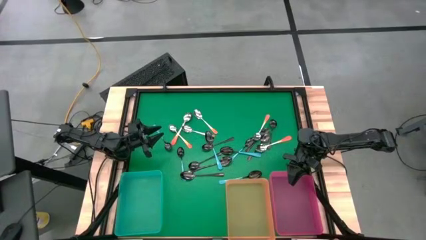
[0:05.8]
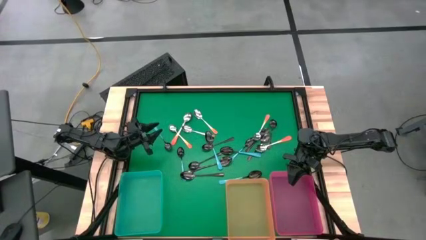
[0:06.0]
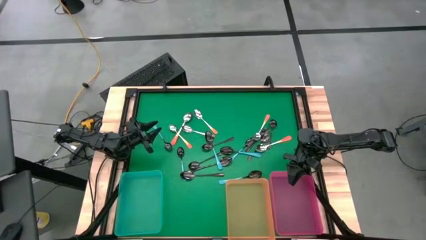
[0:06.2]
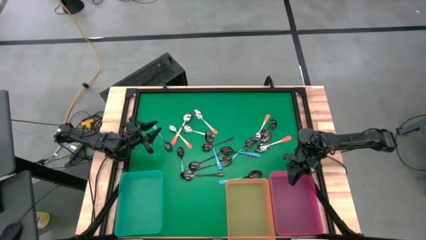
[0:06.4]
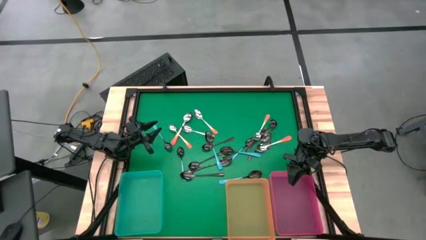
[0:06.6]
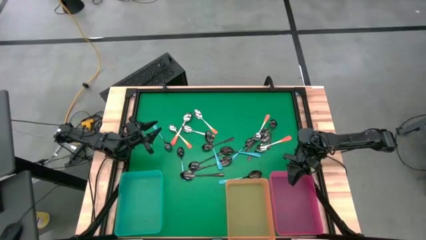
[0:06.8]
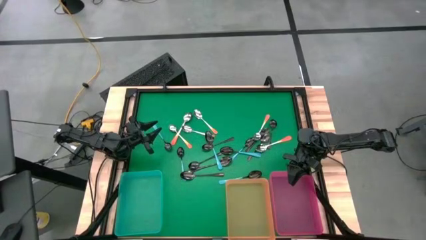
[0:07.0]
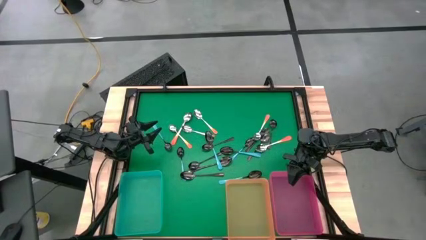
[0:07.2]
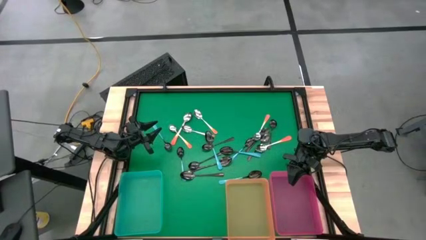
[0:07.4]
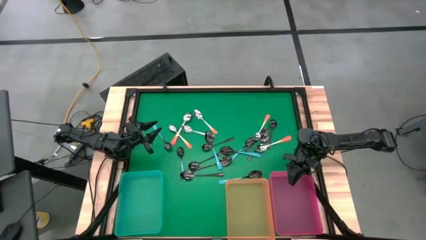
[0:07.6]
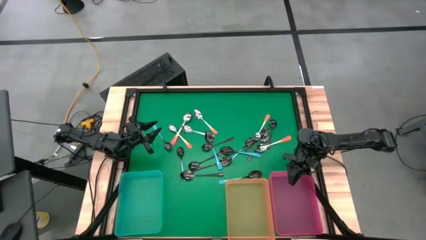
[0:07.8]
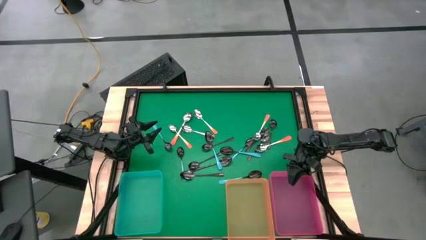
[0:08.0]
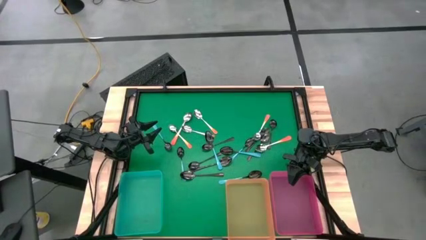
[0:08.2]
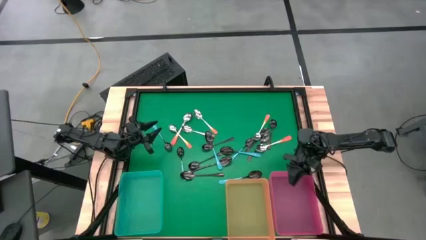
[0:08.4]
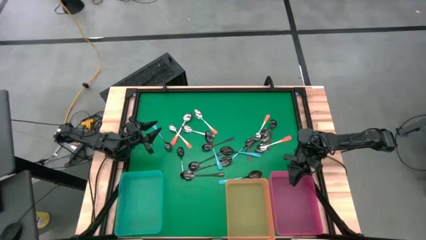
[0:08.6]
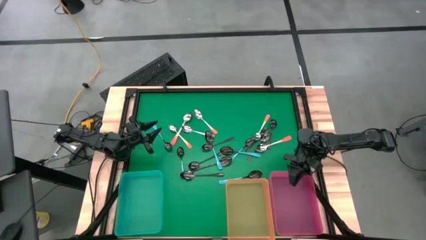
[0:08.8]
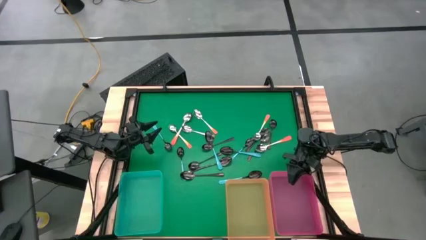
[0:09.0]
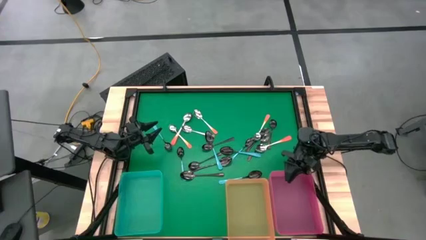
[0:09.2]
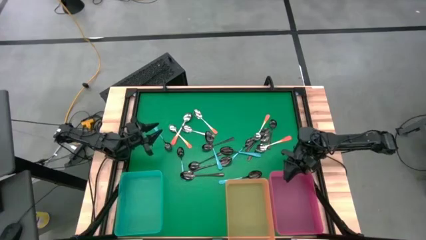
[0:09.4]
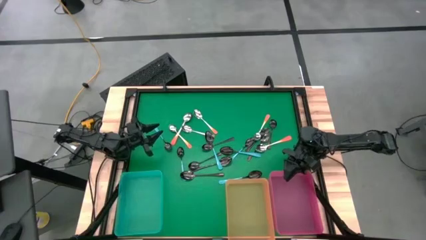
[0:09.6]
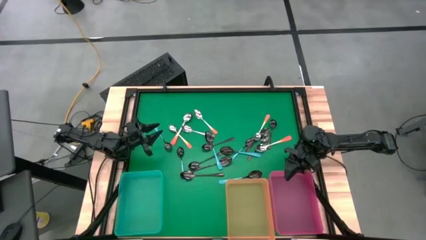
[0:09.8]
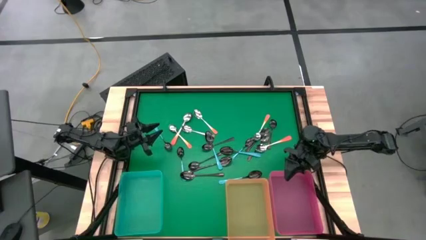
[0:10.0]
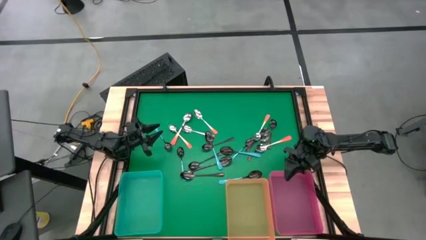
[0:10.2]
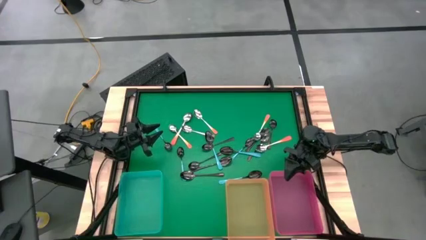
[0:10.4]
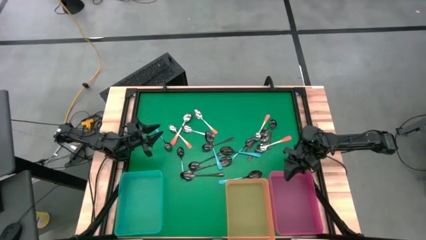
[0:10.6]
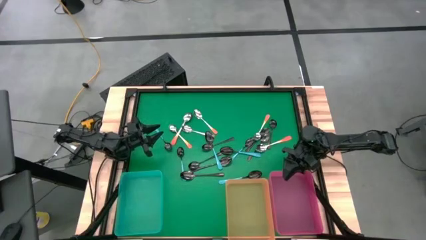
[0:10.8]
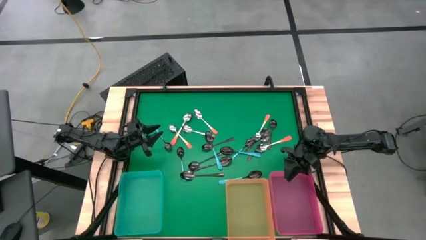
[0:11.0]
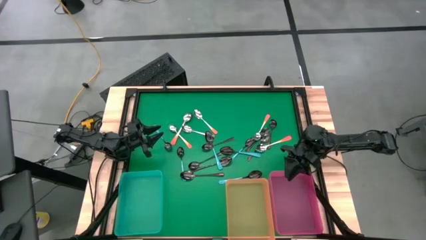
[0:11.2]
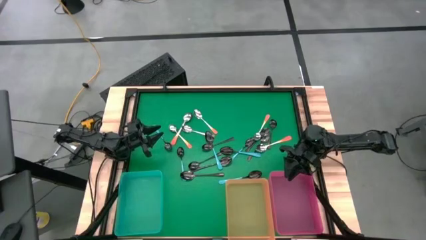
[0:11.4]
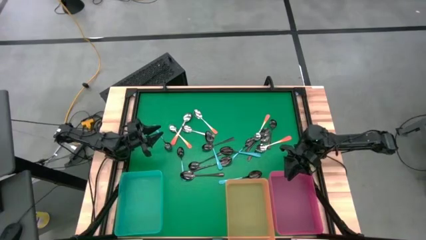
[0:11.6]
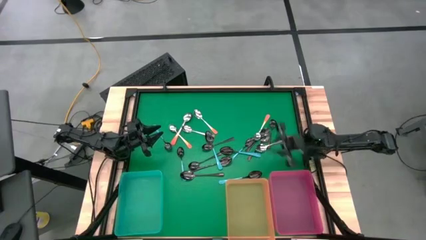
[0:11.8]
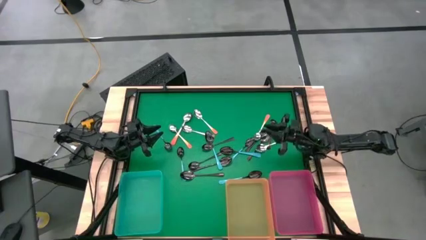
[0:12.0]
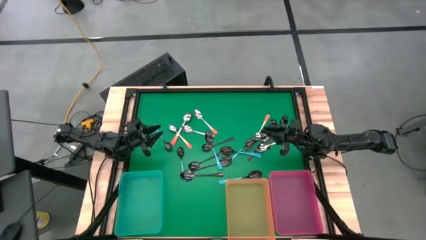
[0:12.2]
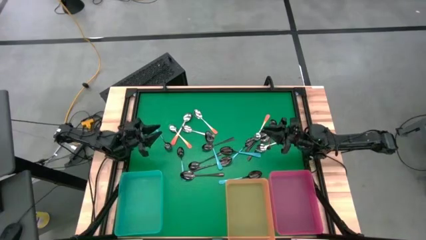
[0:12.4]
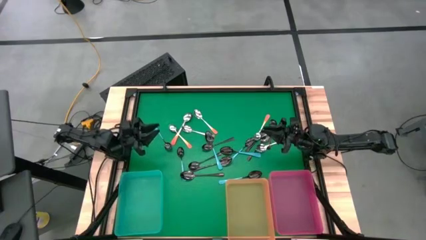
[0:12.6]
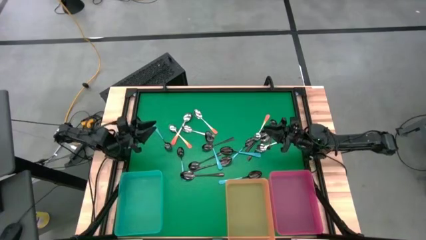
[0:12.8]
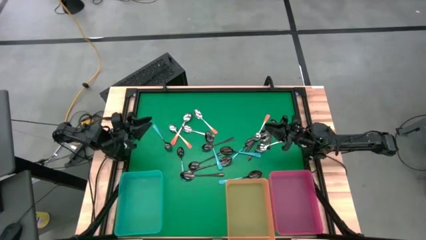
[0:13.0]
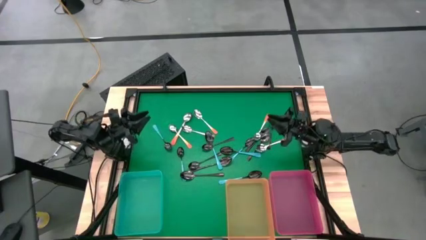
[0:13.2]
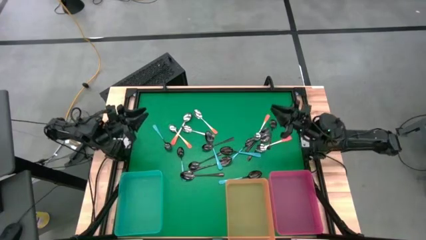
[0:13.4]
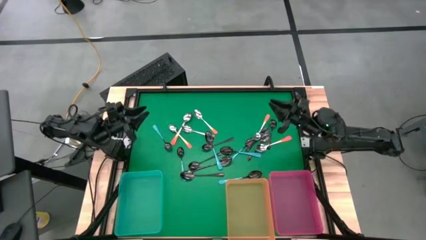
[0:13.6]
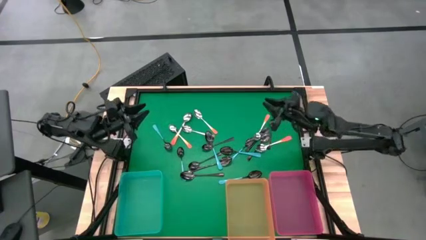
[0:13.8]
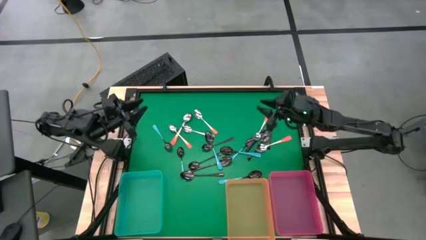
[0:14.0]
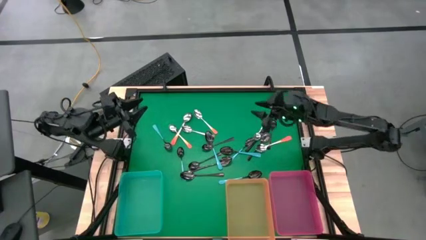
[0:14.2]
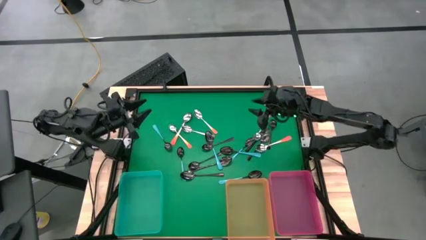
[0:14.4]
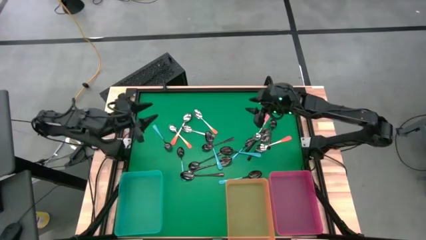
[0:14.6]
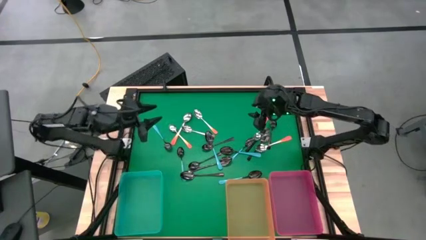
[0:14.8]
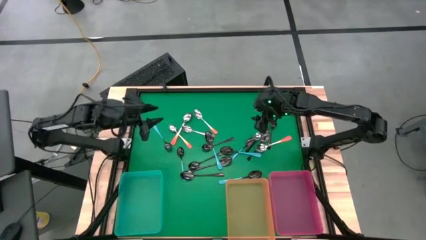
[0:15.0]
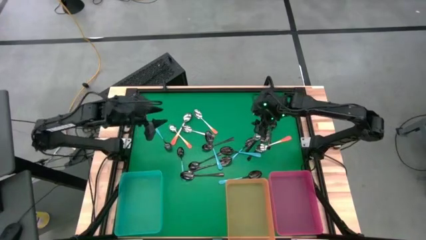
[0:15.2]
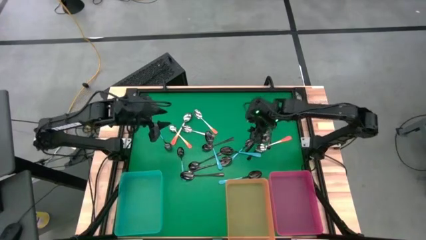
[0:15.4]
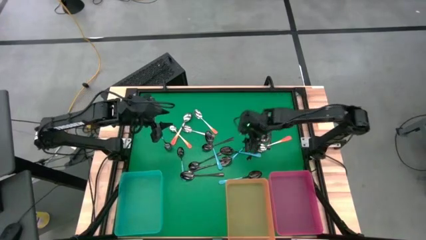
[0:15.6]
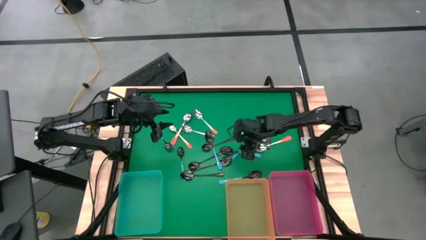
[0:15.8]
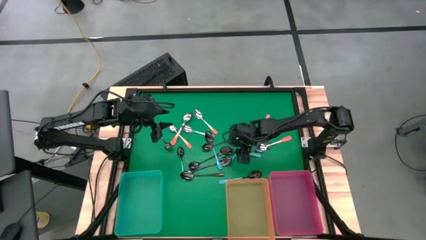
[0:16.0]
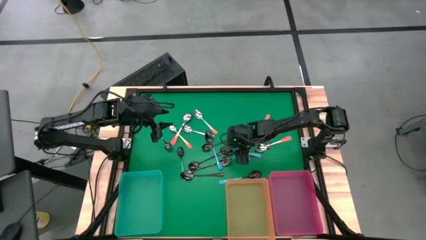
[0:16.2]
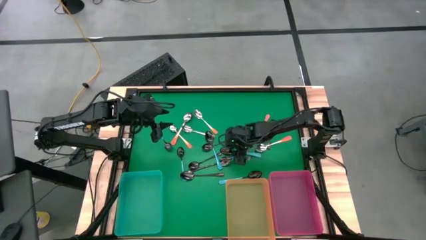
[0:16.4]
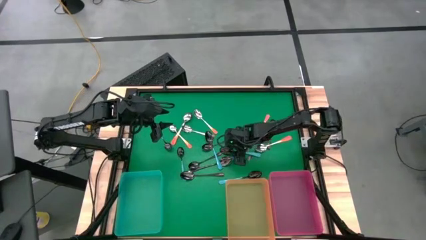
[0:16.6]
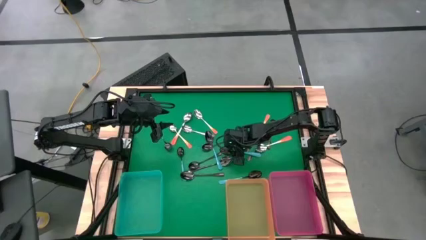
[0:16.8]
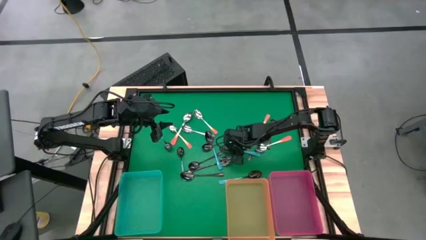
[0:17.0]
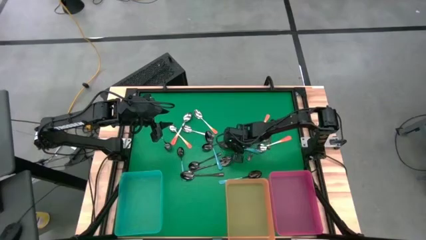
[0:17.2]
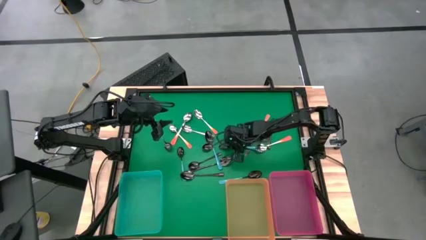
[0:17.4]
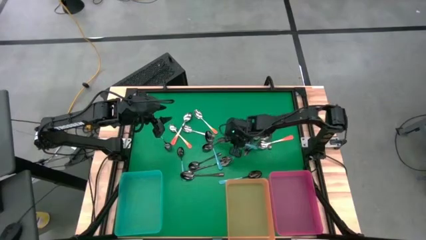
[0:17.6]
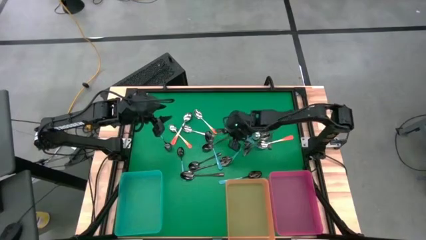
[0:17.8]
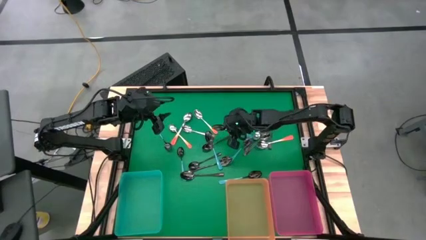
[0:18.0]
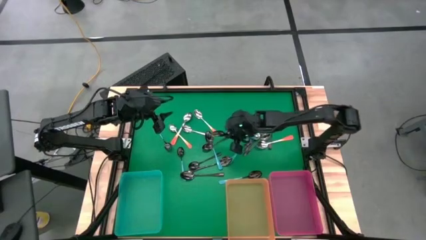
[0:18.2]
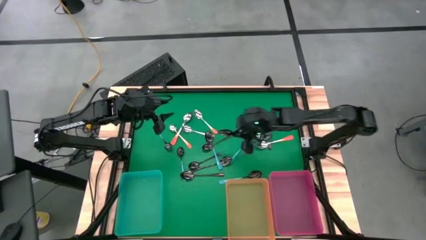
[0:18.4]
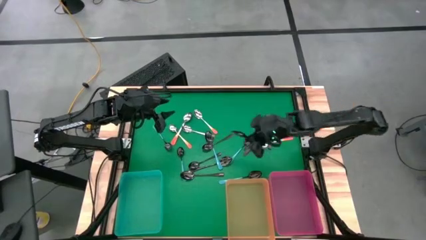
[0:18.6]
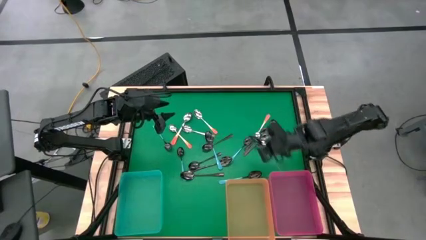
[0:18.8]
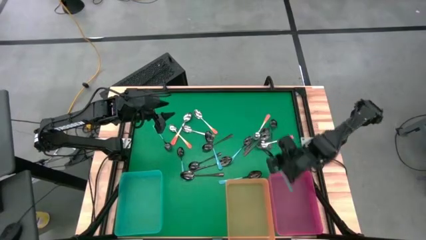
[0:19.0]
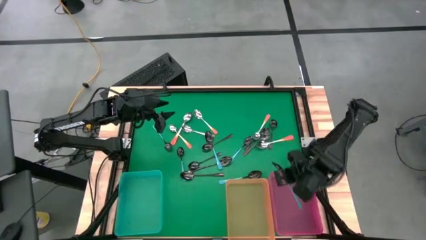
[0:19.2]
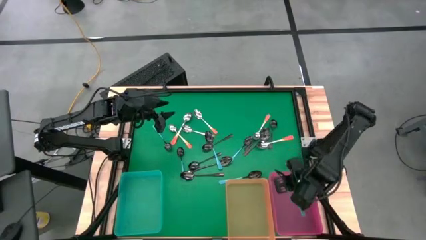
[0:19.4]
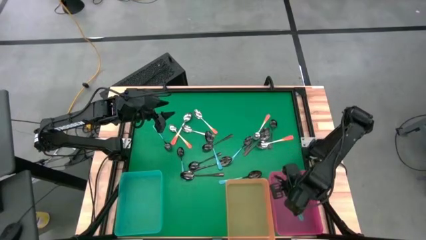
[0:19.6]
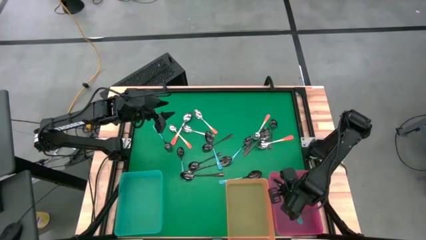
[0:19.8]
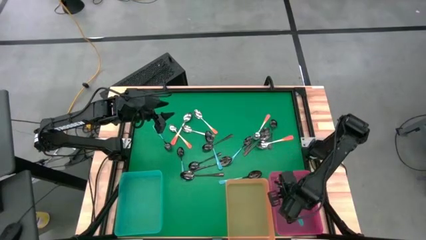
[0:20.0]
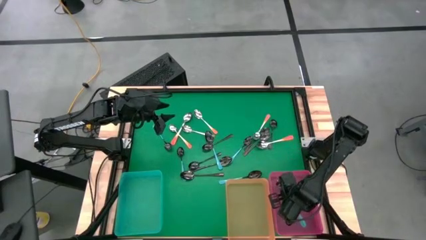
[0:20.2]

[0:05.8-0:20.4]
Task: Sort silverware by color (type)
Put the blue spoon into the pink bin
